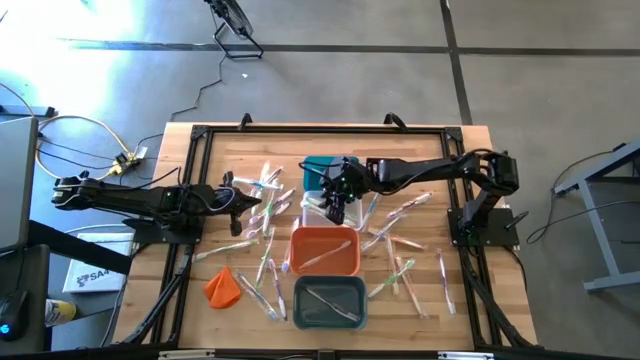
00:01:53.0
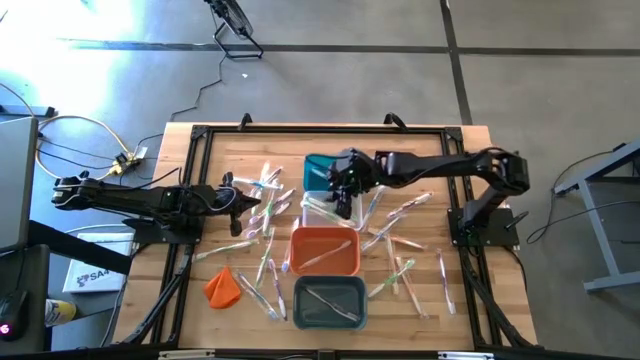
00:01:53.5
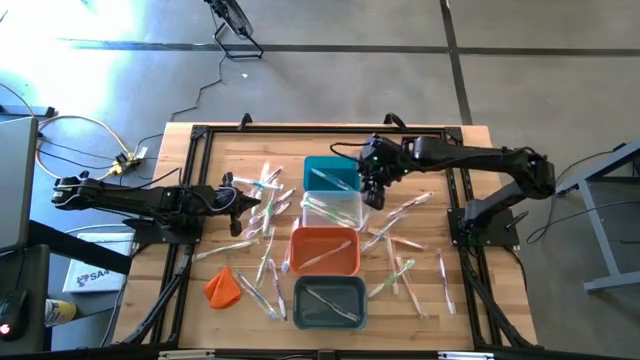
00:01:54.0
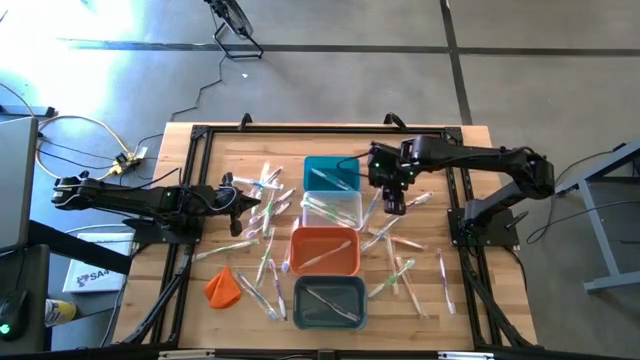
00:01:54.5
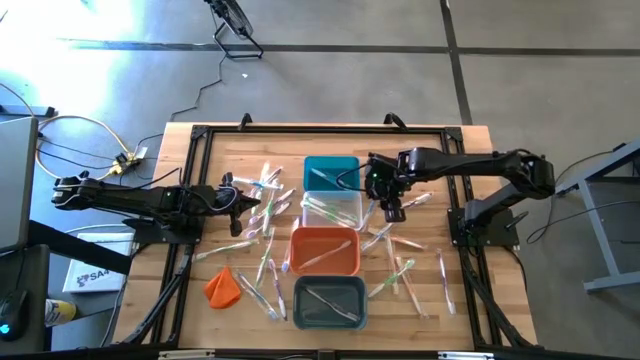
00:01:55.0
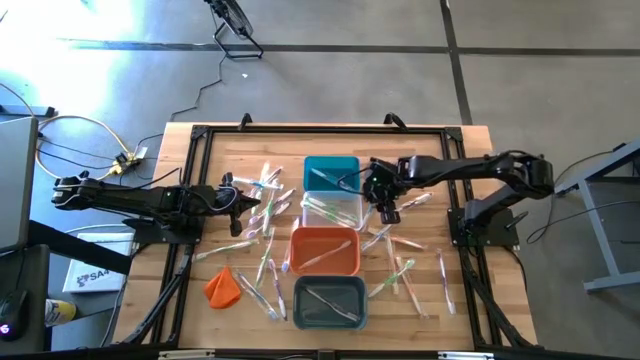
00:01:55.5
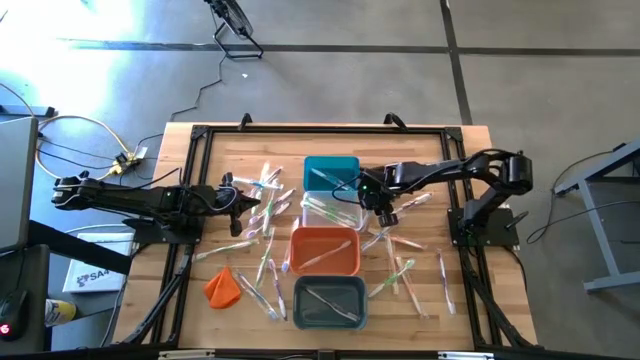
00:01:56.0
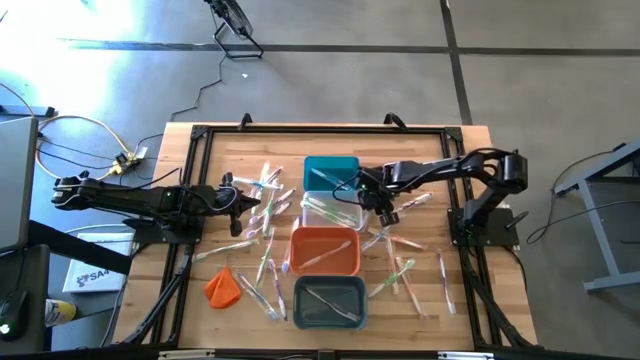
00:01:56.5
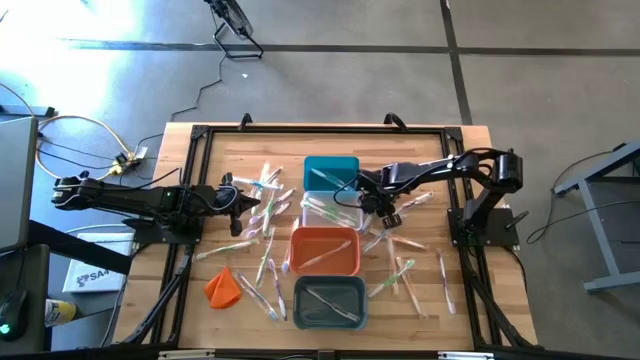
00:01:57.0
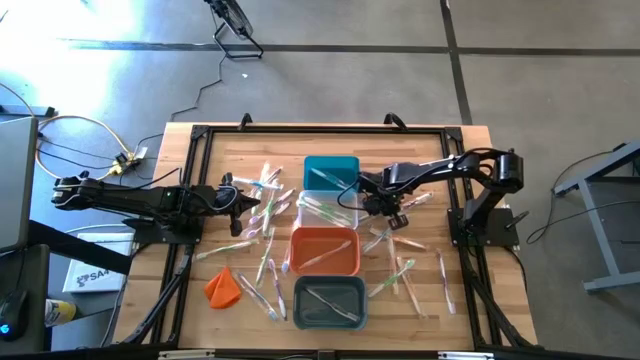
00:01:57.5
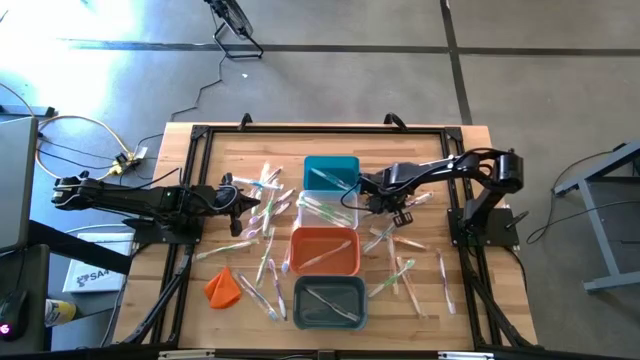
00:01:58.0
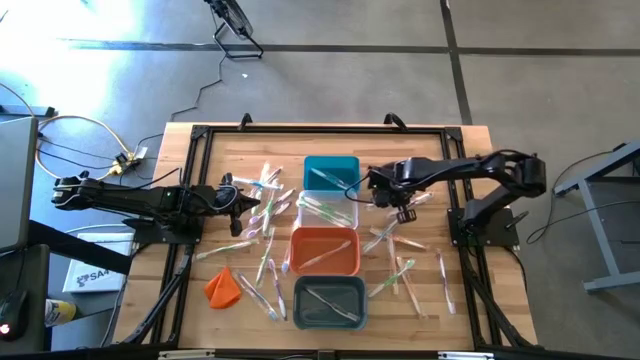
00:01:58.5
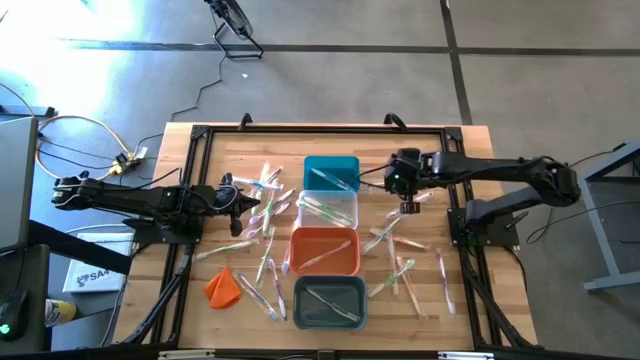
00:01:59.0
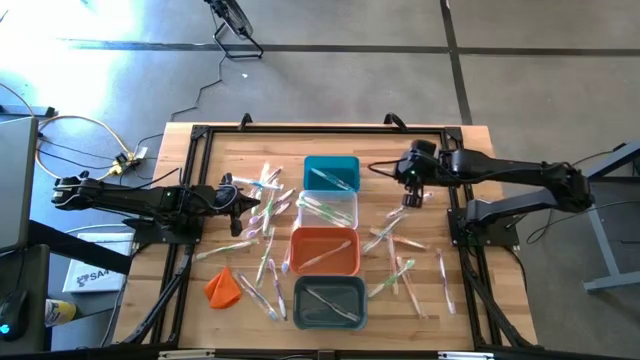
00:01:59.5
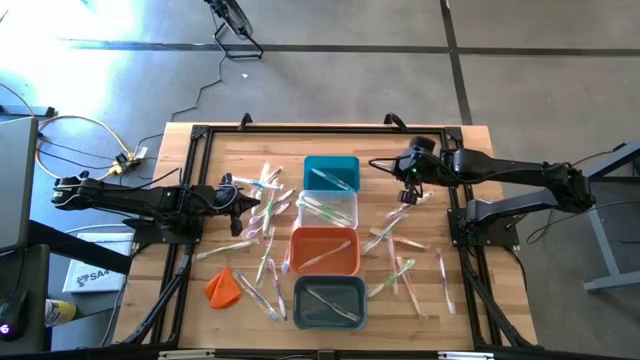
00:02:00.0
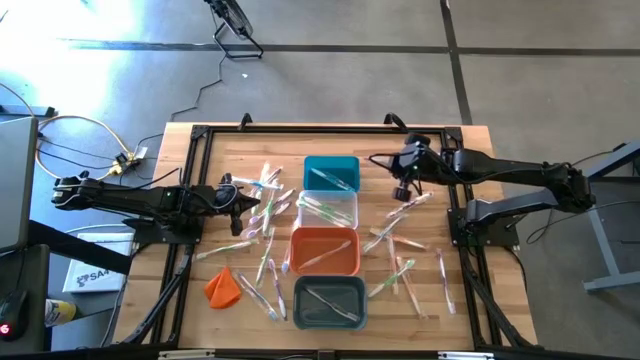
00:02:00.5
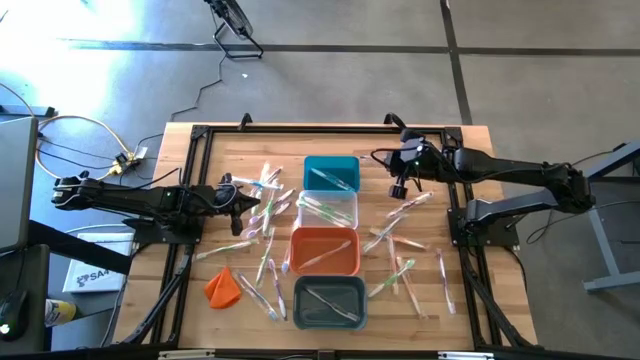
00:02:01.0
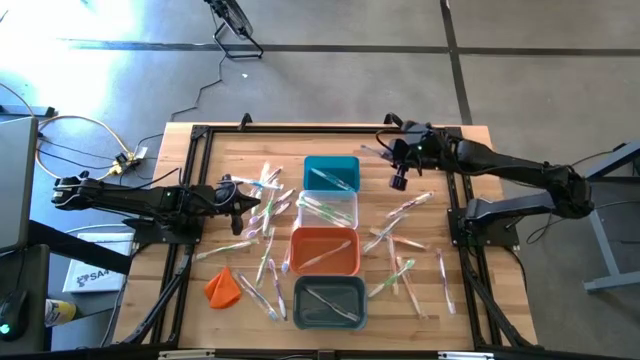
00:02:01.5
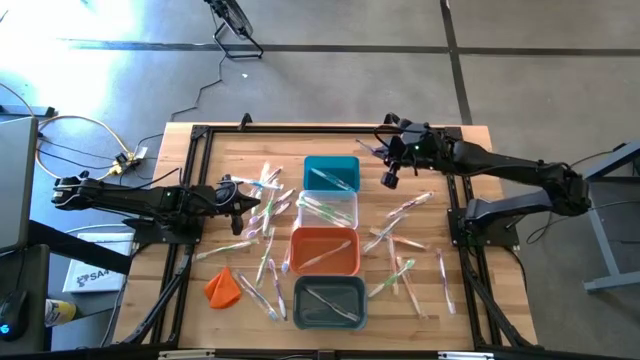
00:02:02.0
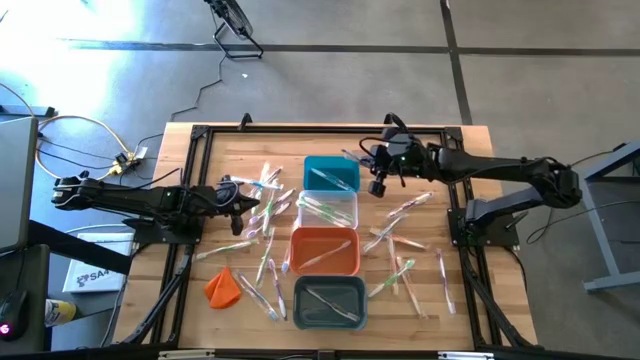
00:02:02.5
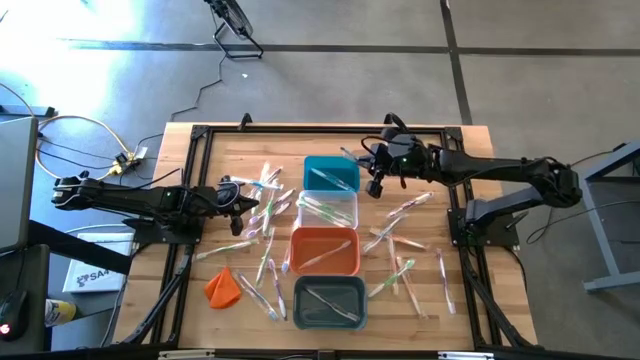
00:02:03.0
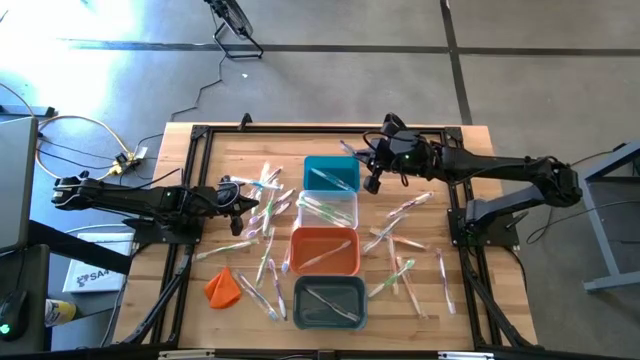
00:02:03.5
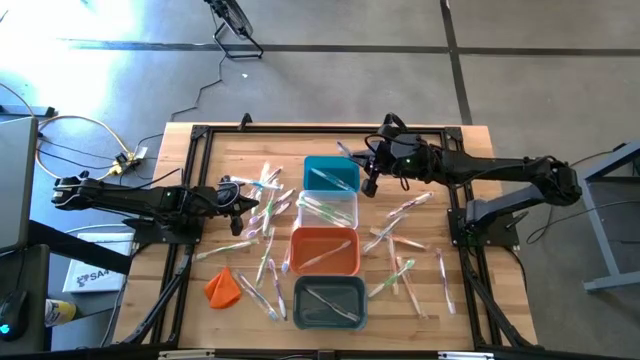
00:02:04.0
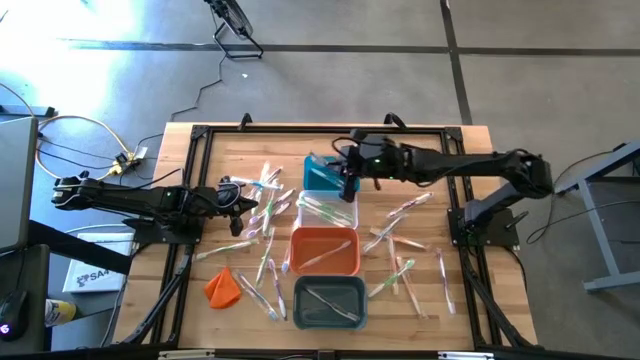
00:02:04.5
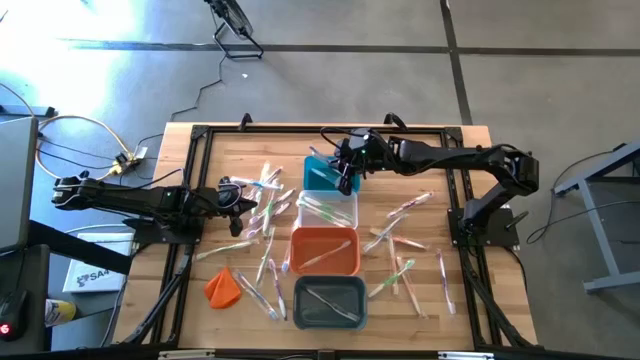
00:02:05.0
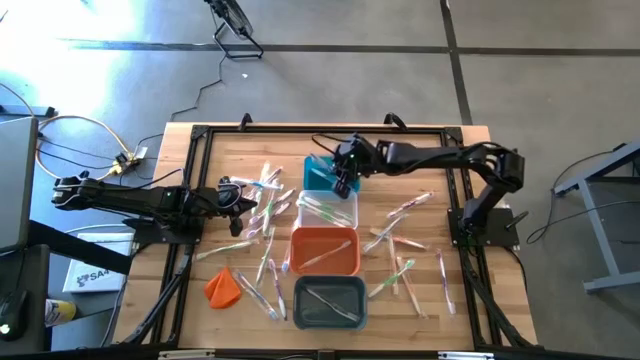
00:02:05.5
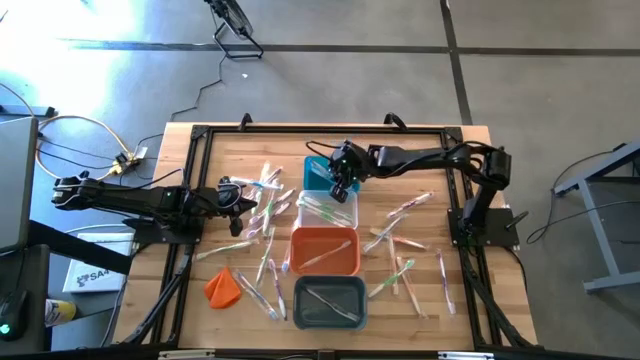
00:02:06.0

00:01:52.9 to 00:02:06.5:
Task: Pick & Place Toothbrushes
Put the blue toothbrush into the blue bin

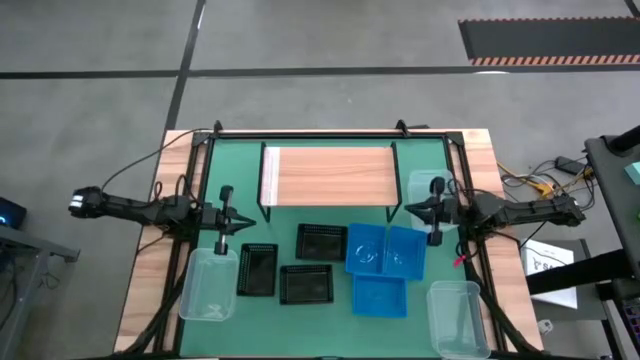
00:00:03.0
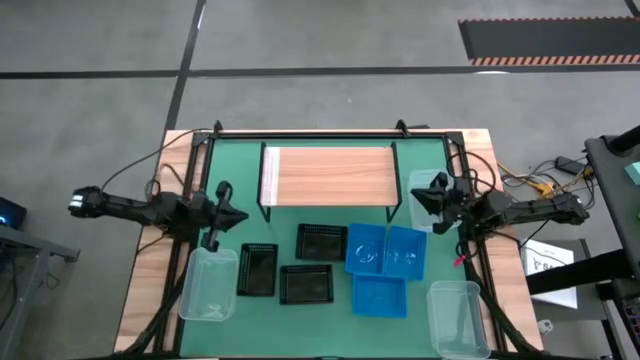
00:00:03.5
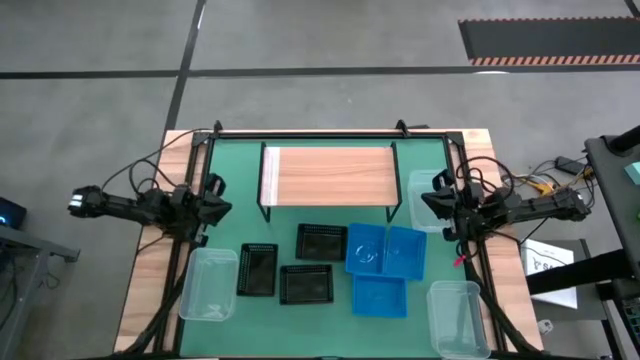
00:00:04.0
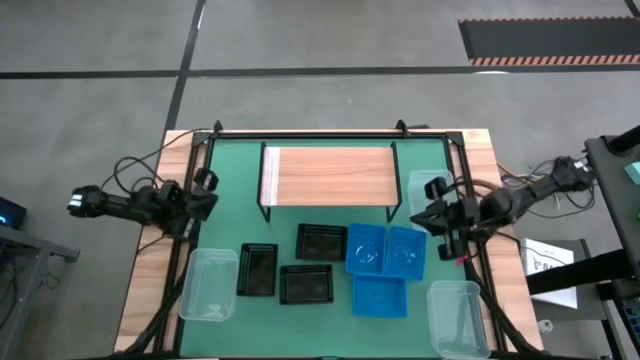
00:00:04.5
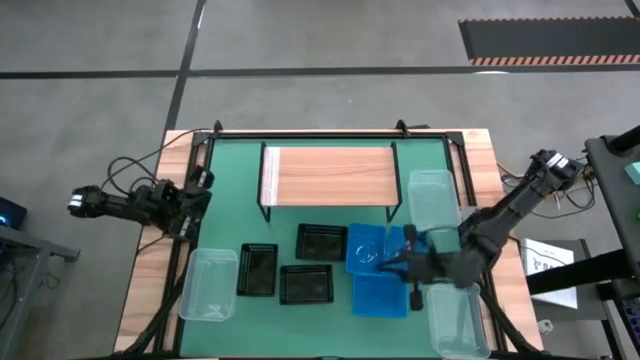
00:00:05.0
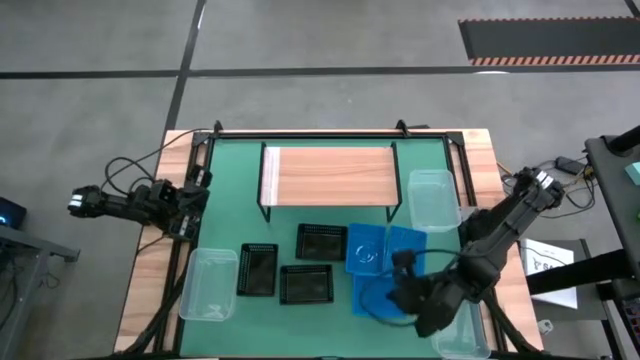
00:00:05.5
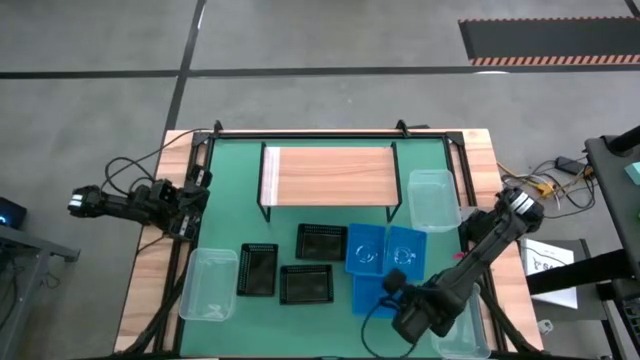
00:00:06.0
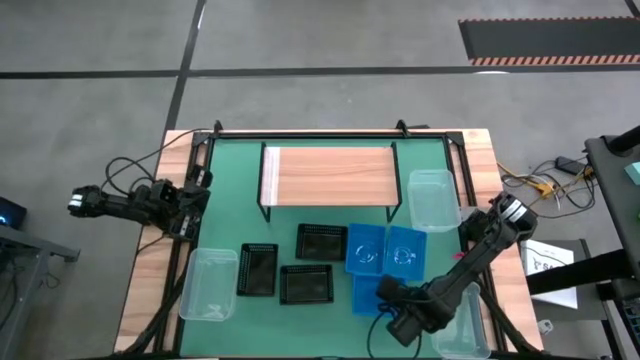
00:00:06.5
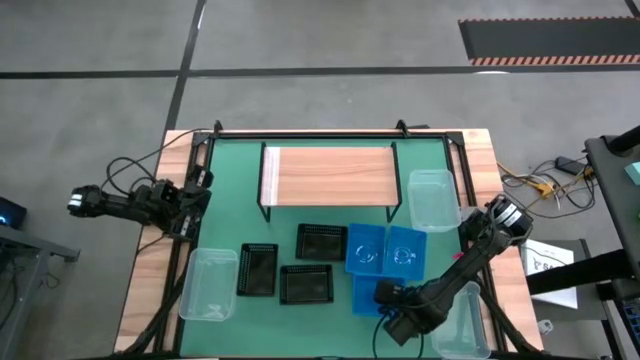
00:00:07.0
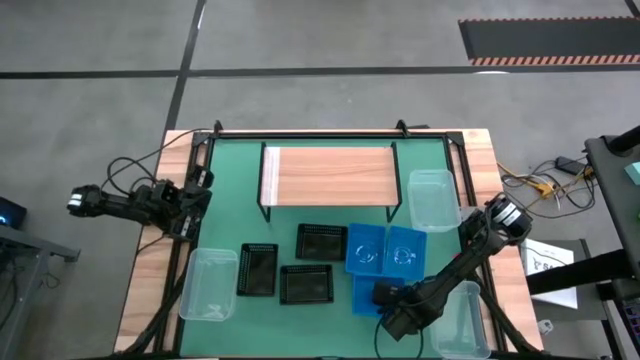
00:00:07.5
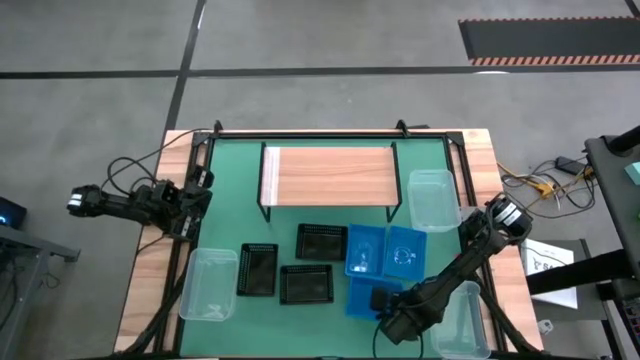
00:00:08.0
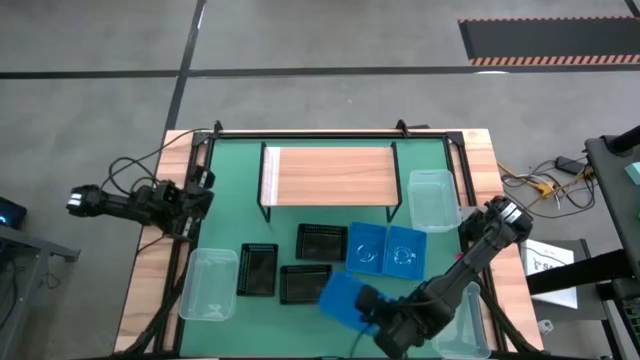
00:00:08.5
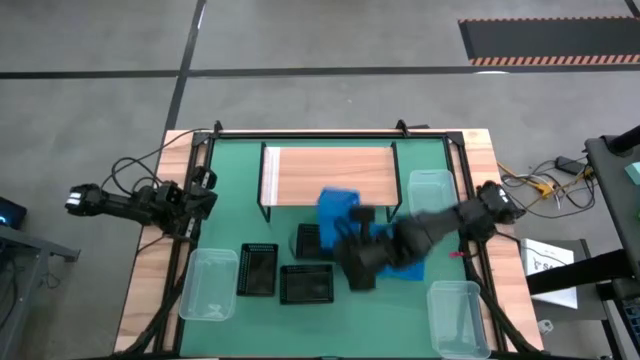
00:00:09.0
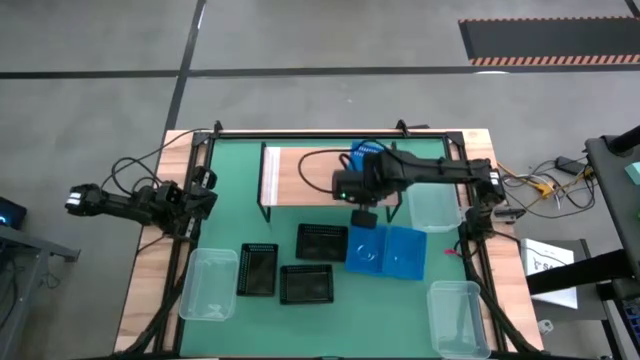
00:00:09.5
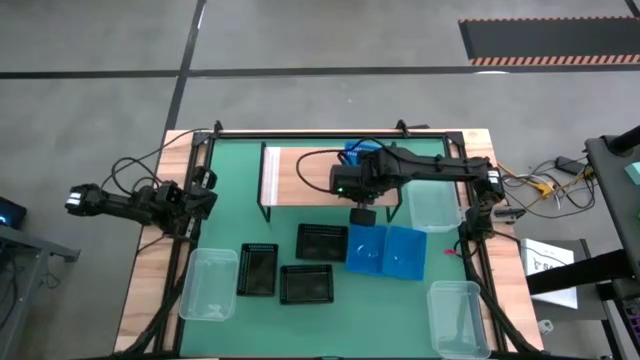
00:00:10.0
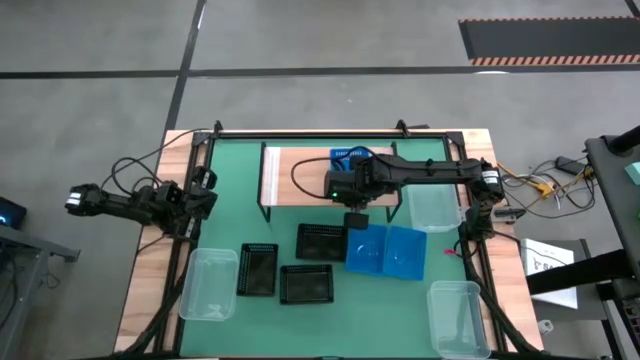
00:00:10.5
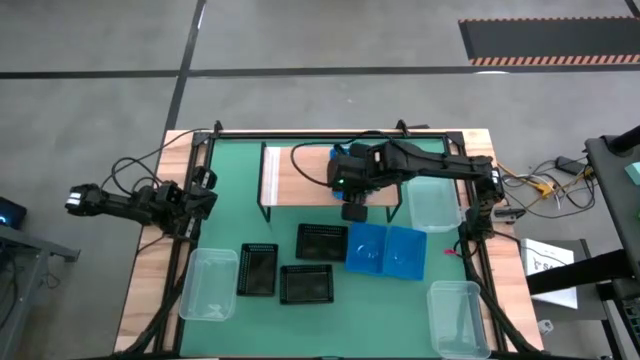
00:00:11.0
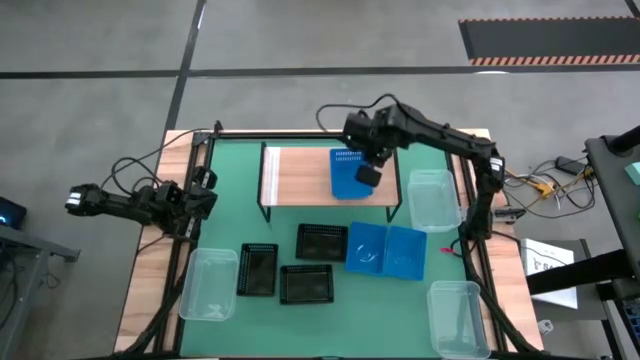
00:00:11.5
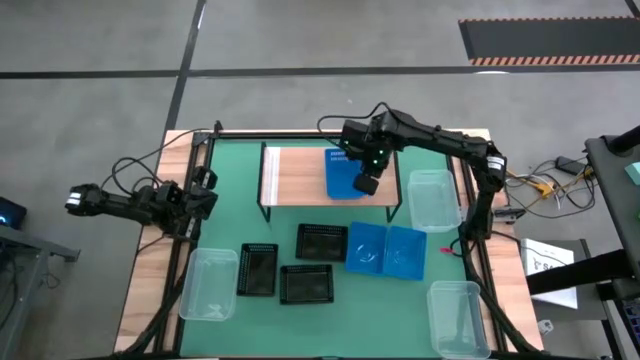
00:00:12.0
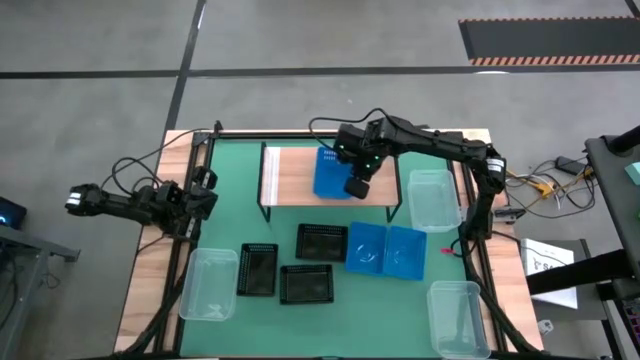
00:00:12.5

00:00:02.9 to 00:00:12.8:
Task: Stack baskets on shelf by color
Put the bottom blue bin on the shelf
